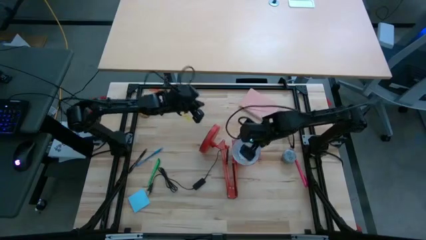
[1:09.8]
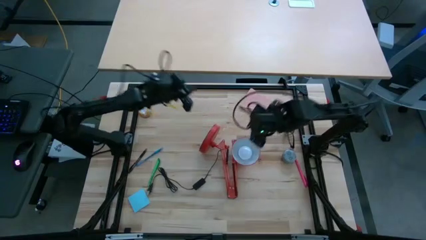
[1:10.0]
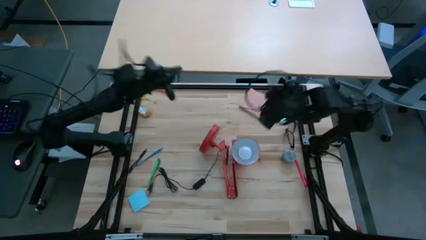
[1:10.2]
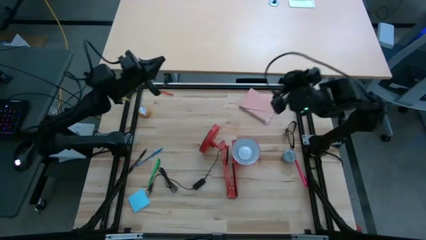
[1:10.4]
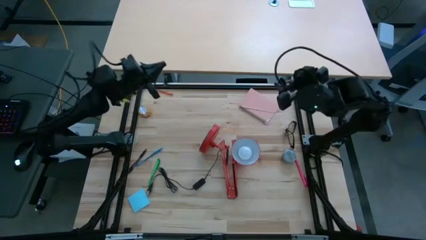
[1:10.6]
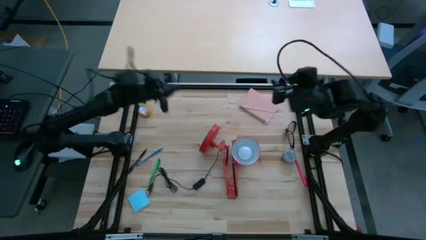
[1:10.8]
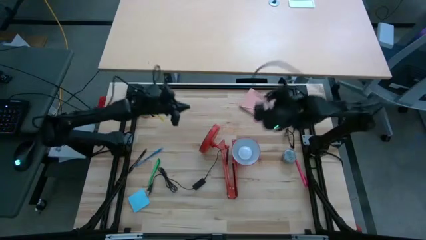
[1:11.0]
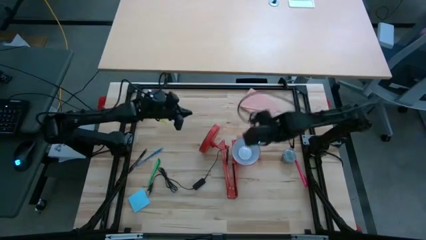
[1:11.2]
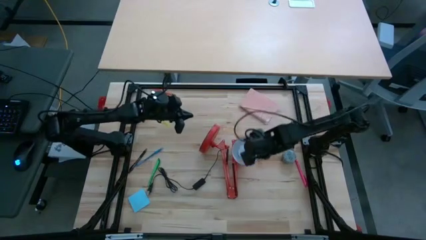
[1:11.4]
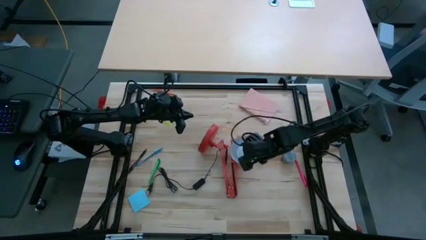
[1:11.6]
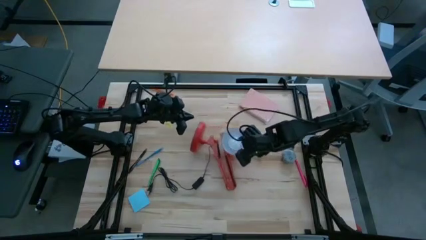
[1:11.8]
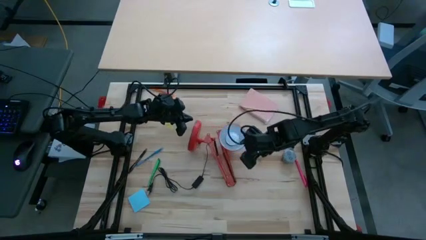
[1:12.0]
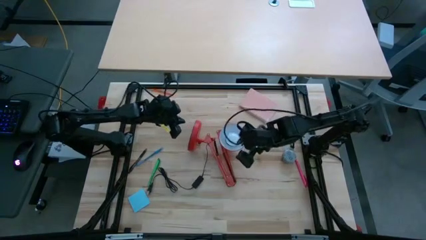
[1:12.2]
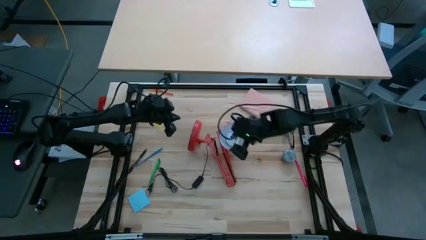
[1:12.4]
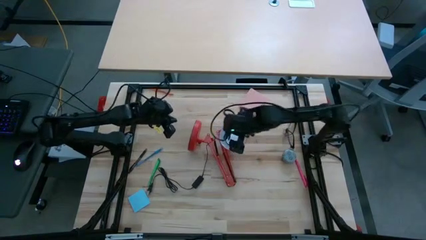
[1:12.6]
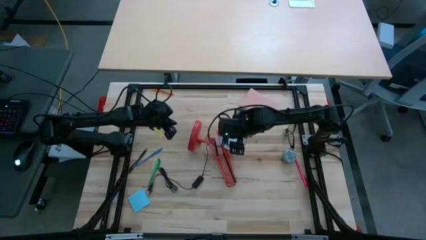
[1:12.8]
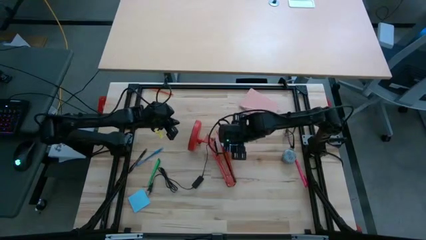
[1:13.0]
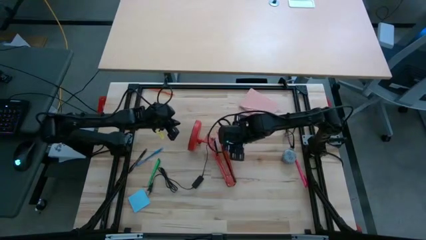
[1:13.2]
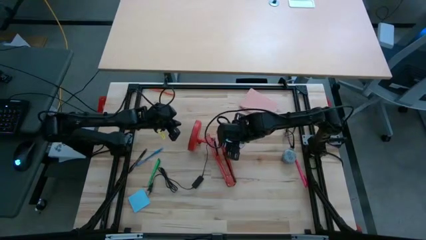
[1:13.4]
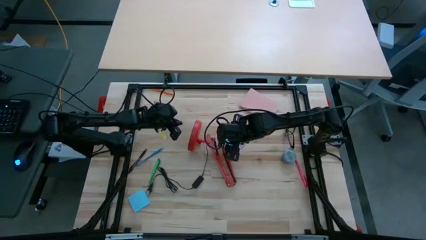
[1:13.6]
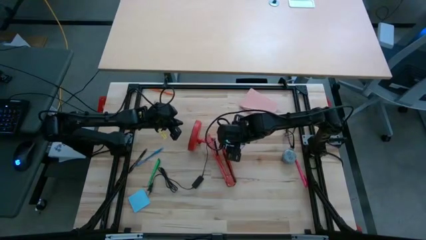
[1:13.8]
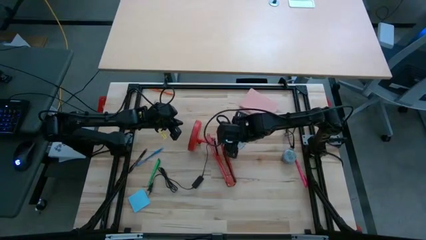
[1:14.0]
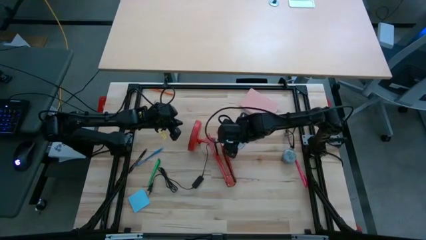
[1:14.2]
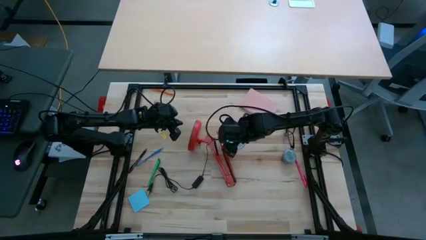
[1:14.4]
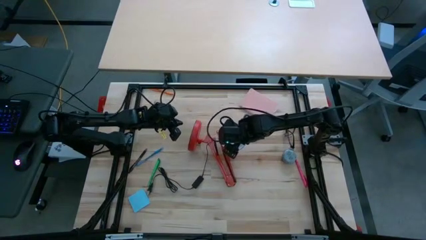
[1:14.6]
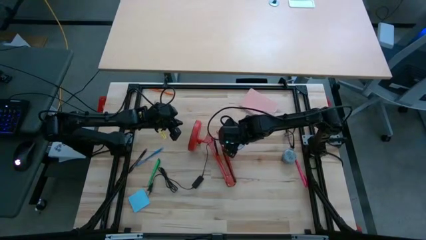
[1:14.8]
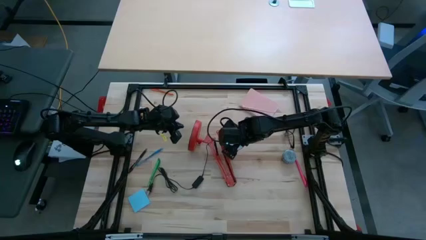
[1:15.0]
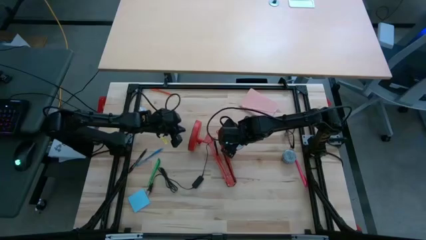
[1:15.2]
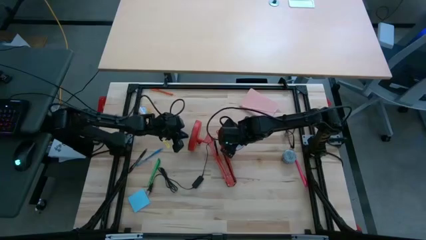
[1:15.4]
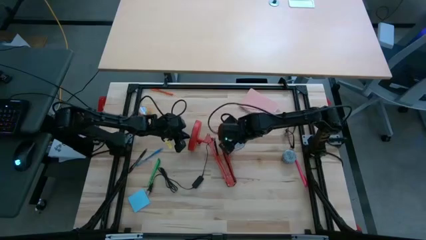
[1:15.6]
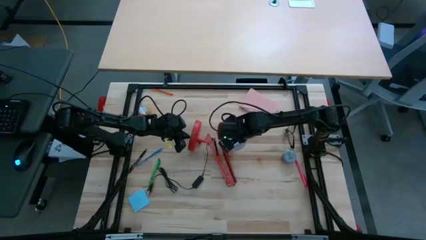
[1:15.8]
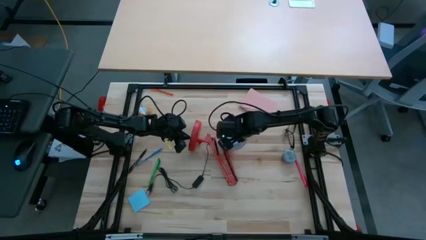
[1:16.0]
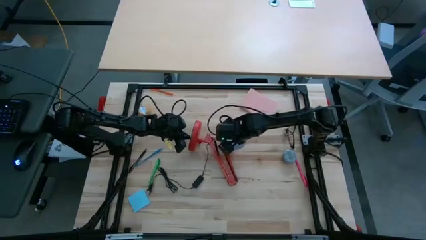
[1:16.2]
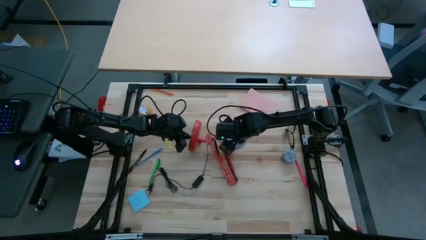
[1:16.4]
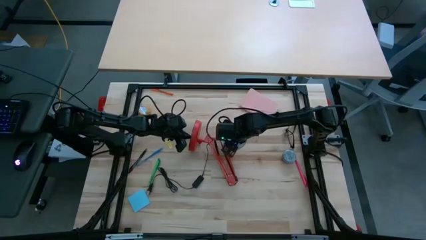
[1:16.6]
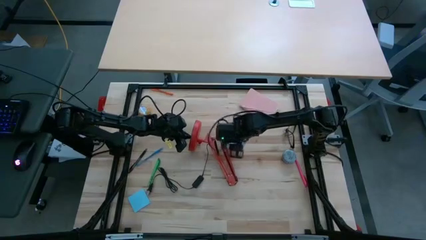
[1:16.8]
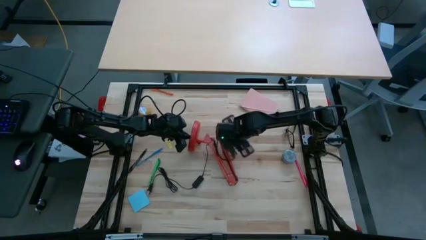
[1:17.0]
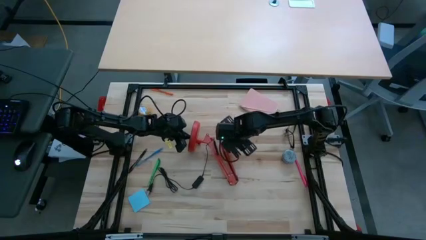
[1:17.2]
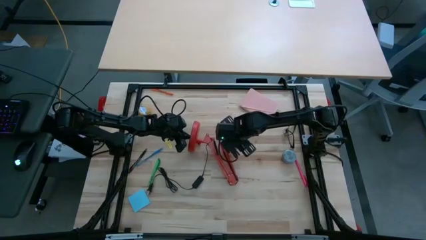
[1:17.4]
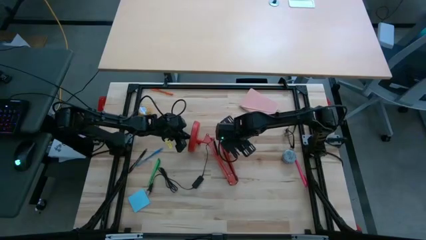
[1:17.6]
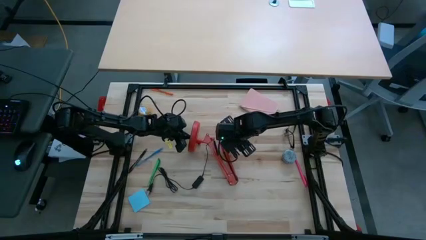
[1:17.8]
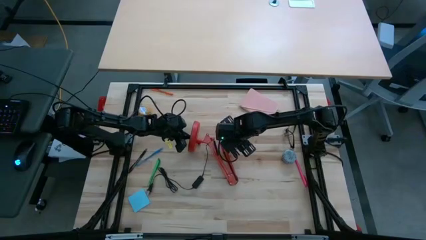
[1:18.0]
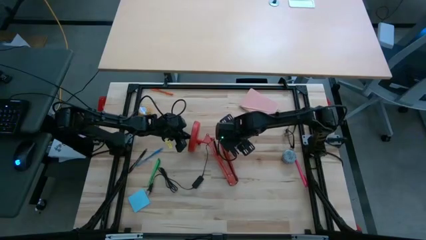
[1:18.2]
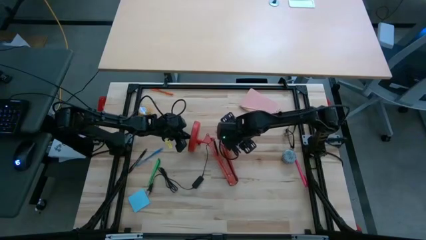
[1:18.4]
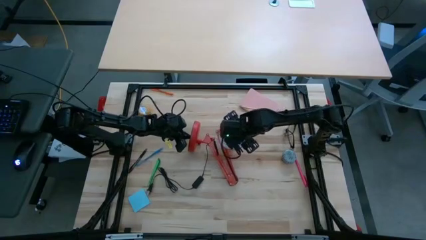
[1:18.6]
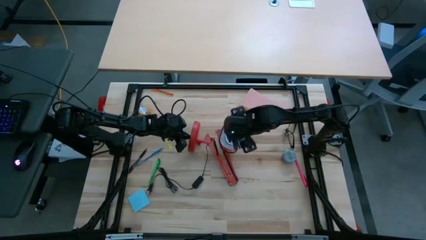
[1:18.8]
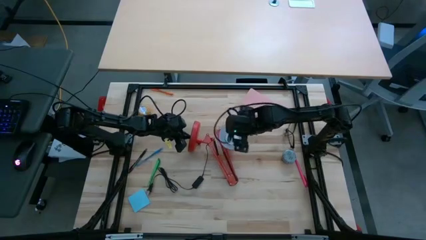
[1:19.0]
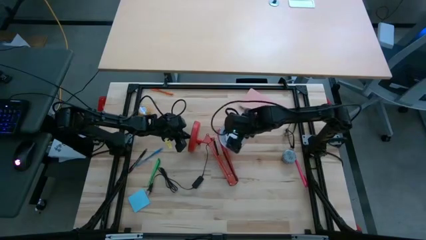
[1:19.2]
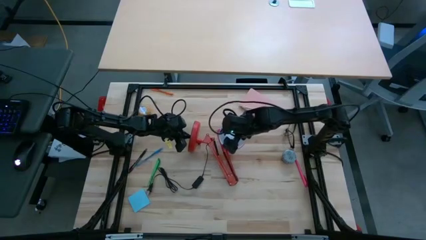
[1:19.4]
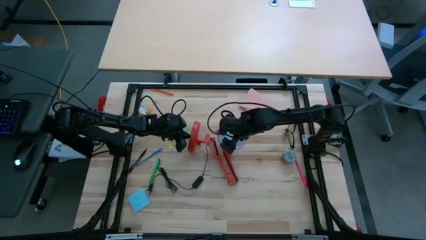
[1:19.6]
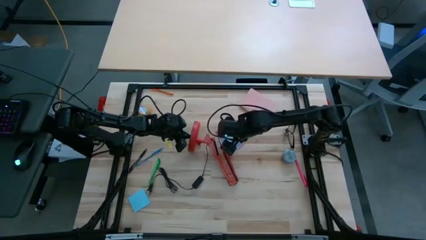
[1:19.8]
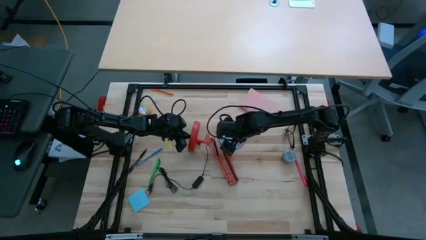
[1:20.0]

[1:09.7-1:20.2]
Task: Screw lightbulb
Remove the white lightbulb from the red lamp
